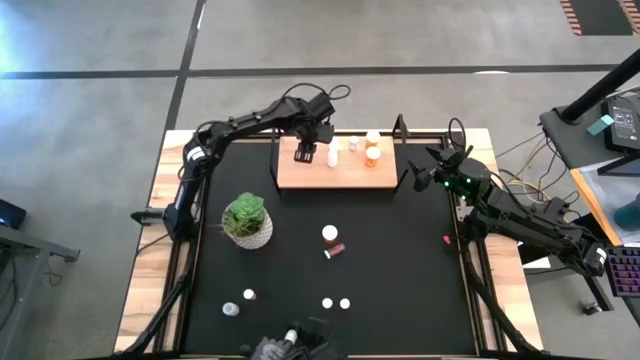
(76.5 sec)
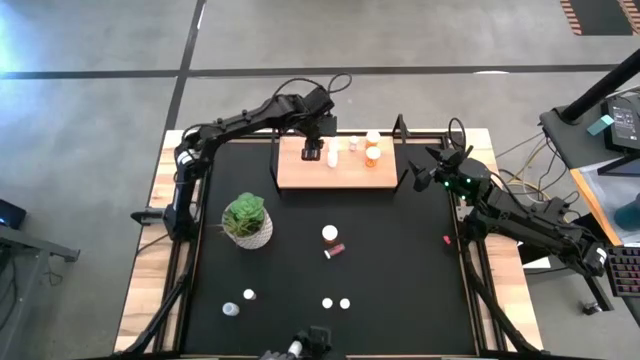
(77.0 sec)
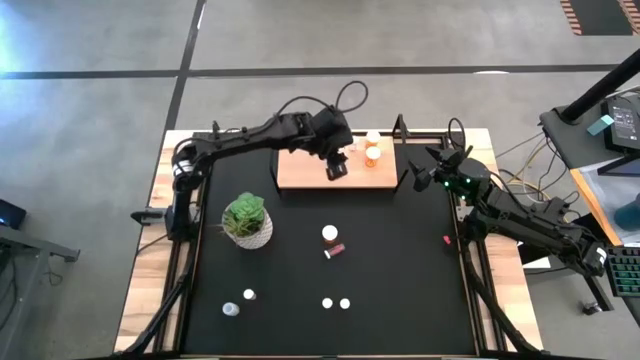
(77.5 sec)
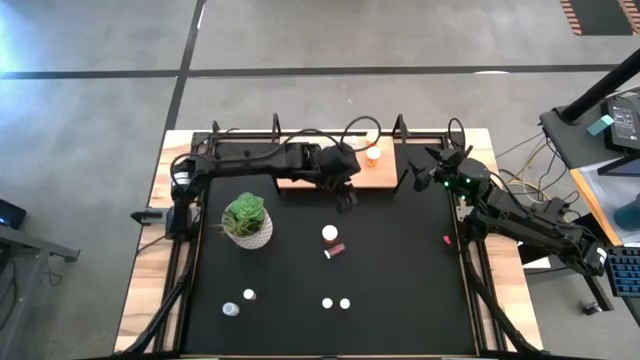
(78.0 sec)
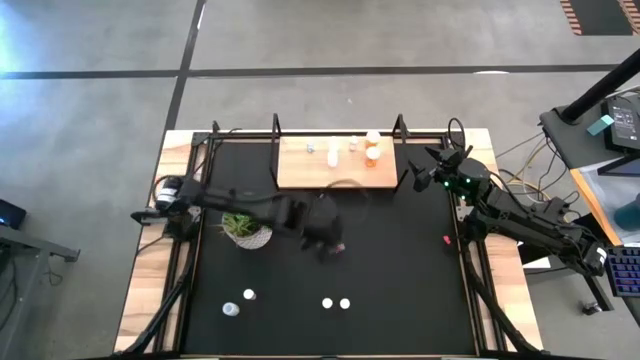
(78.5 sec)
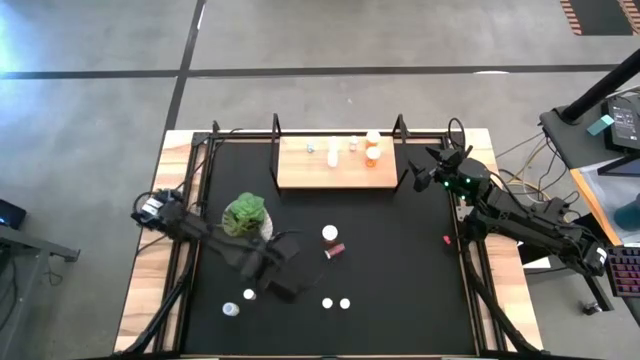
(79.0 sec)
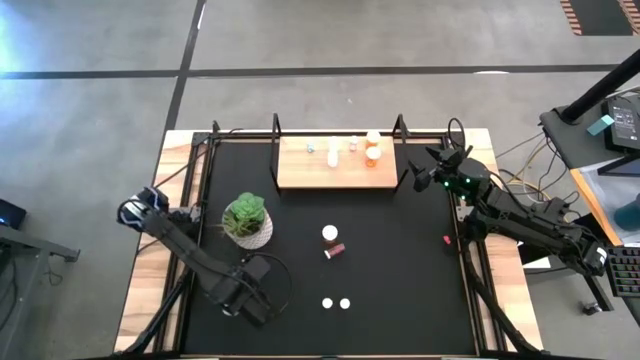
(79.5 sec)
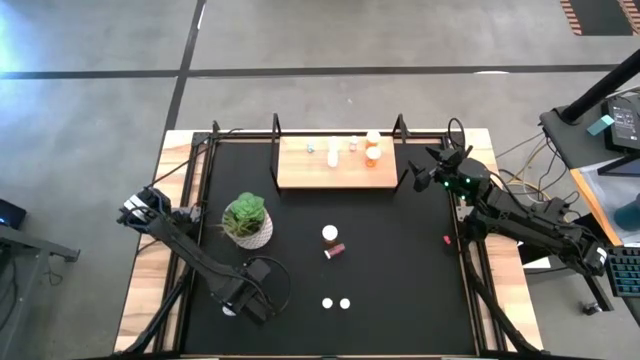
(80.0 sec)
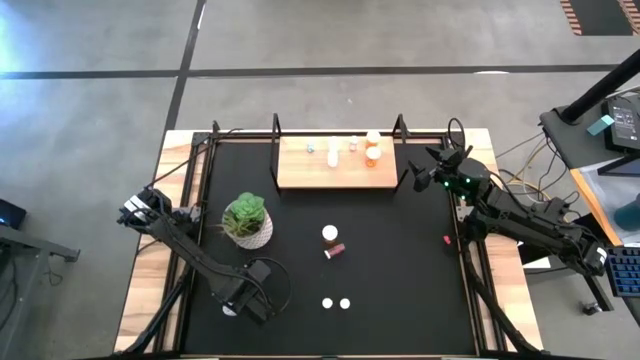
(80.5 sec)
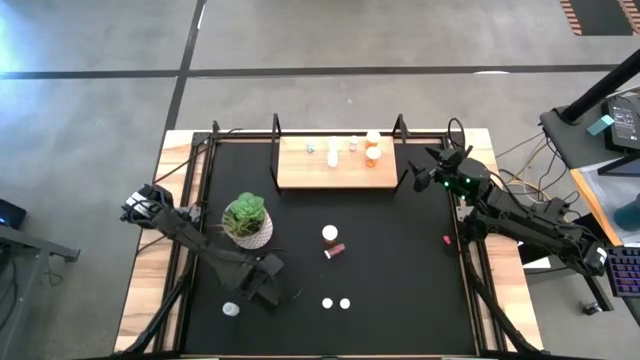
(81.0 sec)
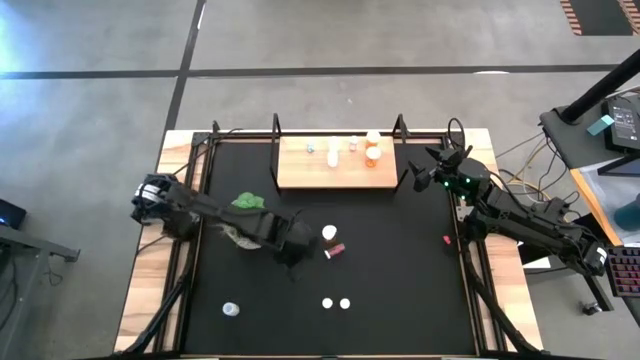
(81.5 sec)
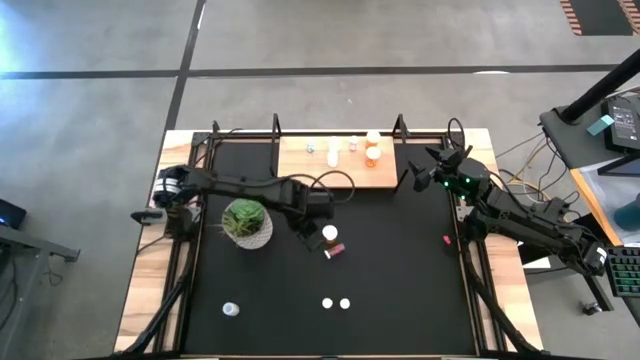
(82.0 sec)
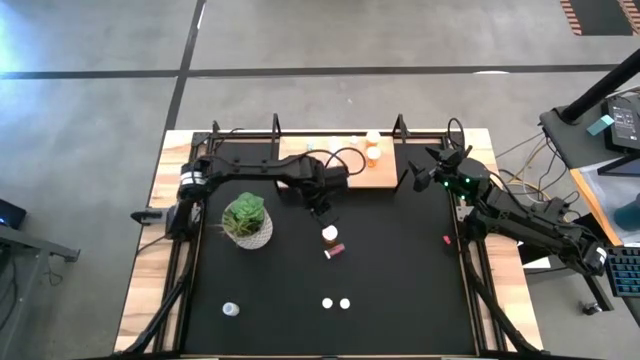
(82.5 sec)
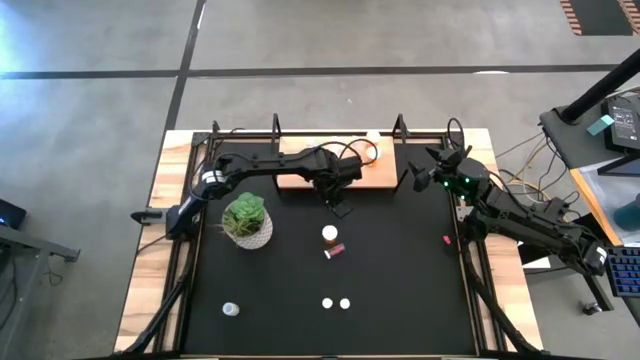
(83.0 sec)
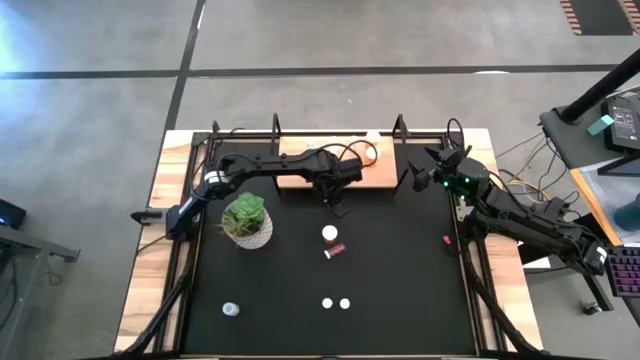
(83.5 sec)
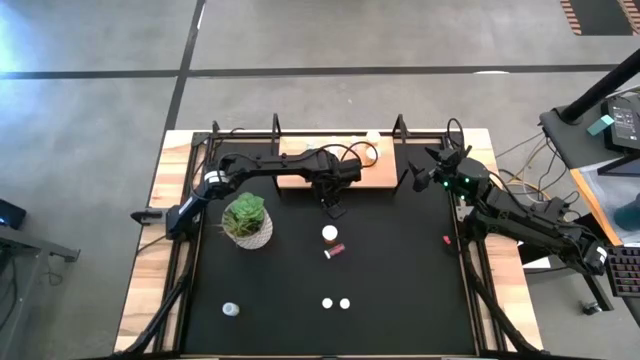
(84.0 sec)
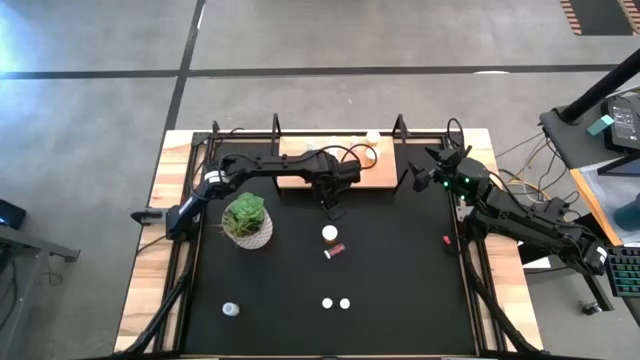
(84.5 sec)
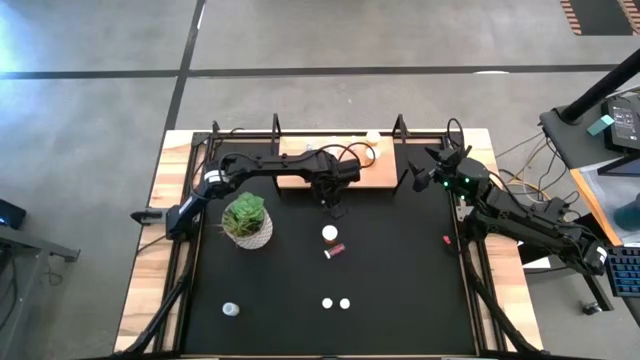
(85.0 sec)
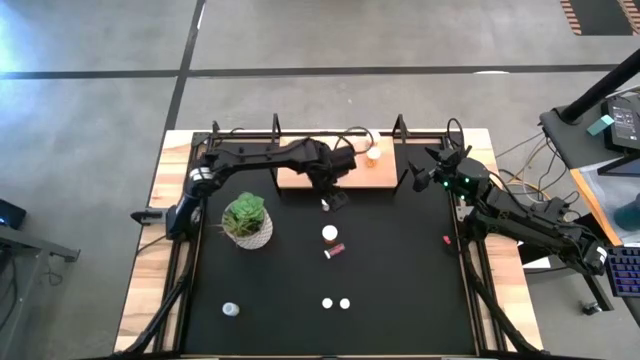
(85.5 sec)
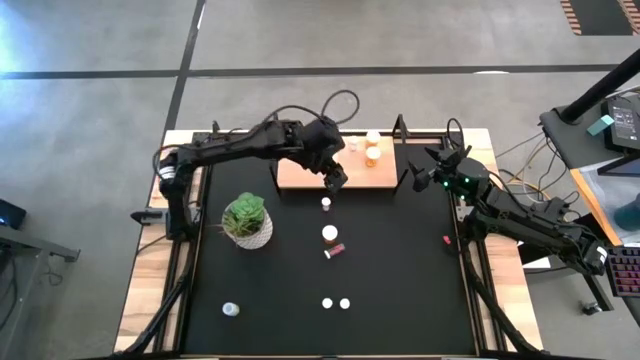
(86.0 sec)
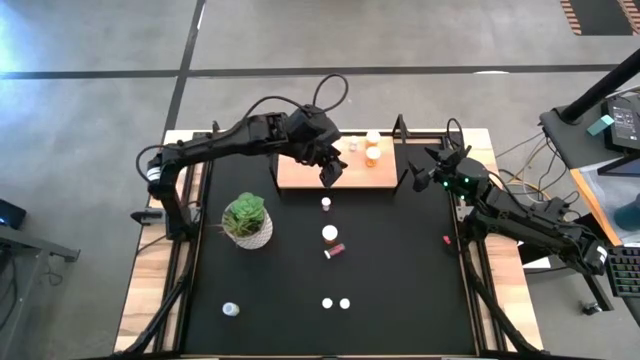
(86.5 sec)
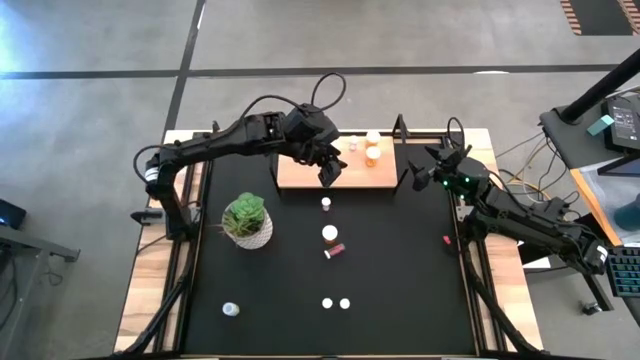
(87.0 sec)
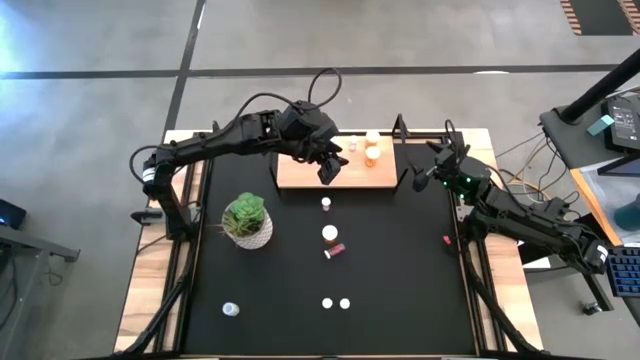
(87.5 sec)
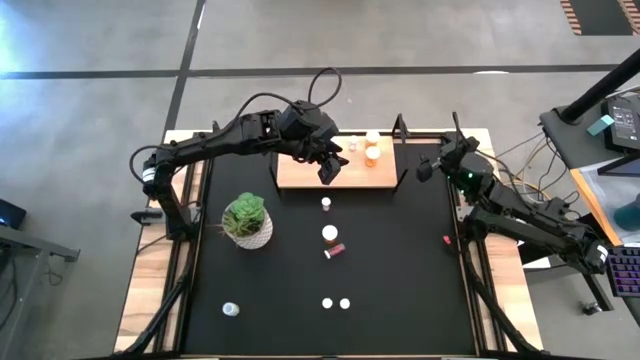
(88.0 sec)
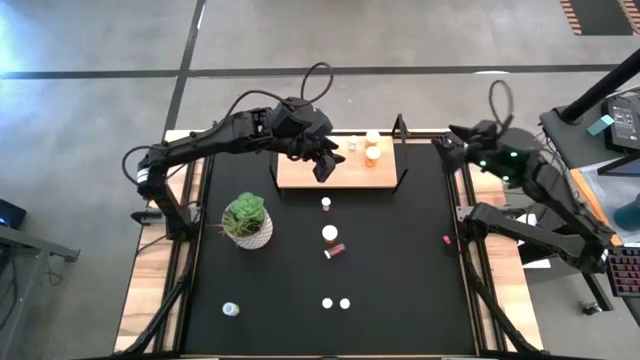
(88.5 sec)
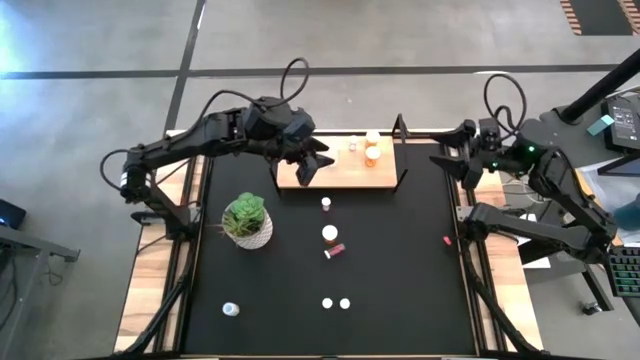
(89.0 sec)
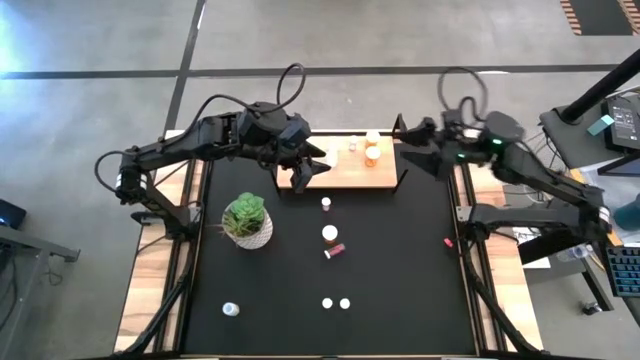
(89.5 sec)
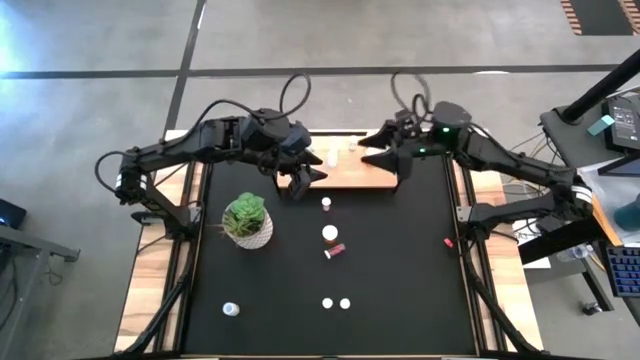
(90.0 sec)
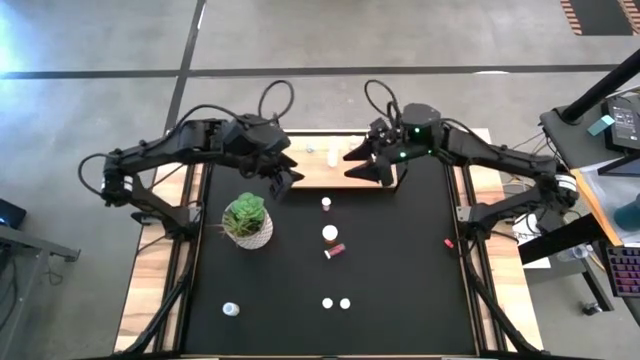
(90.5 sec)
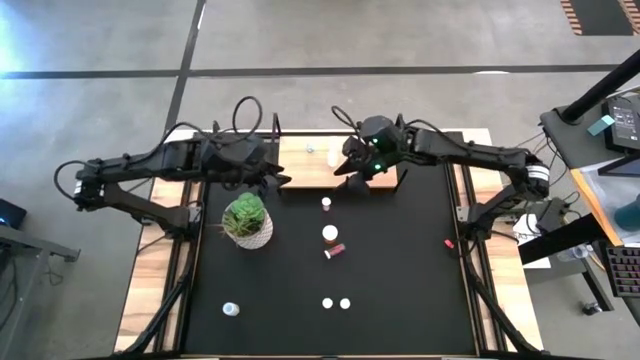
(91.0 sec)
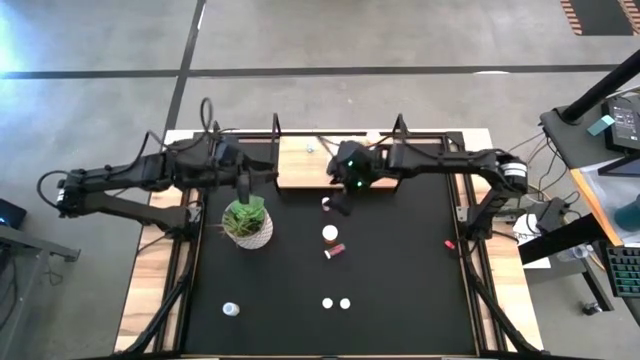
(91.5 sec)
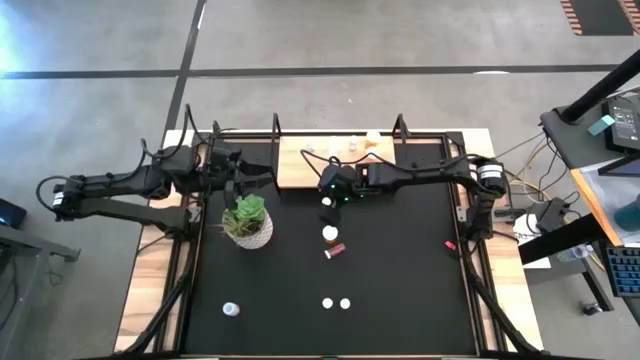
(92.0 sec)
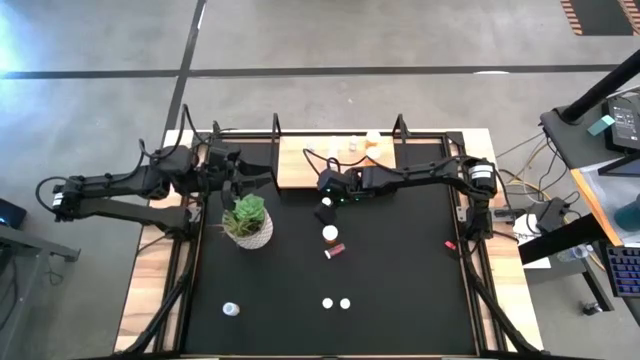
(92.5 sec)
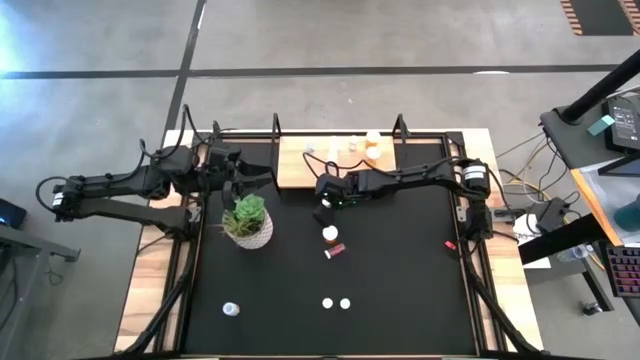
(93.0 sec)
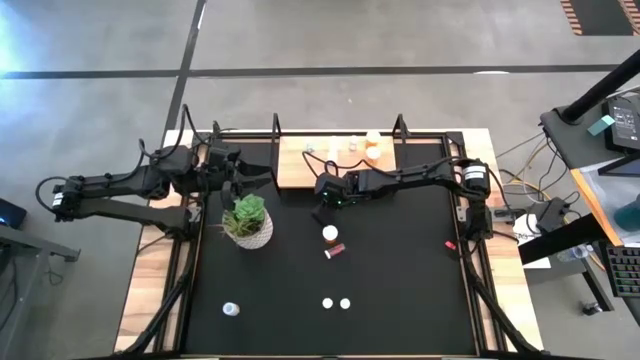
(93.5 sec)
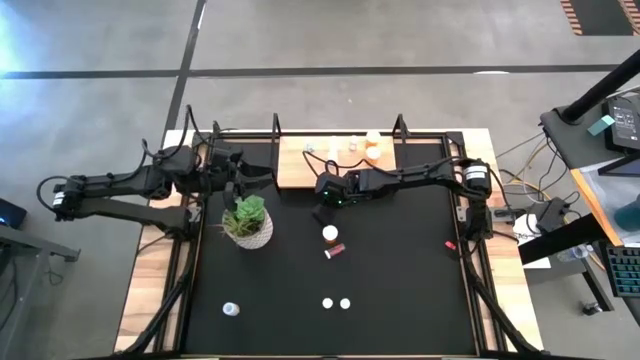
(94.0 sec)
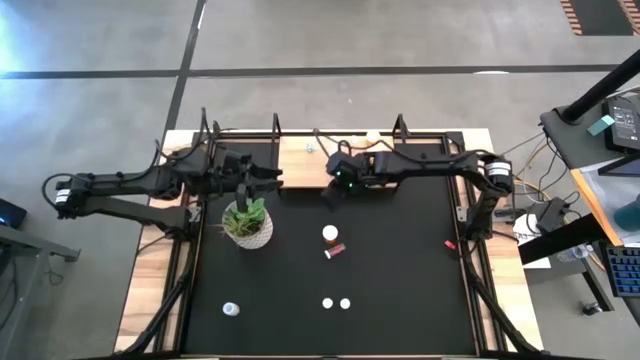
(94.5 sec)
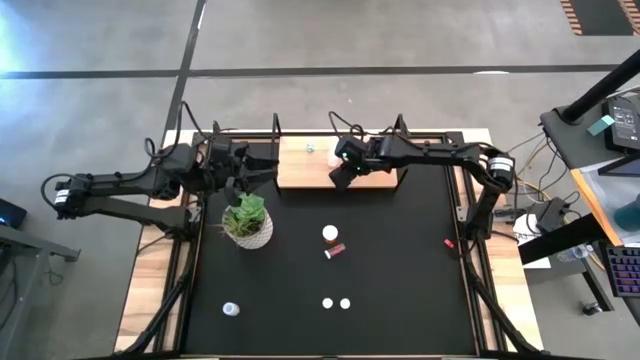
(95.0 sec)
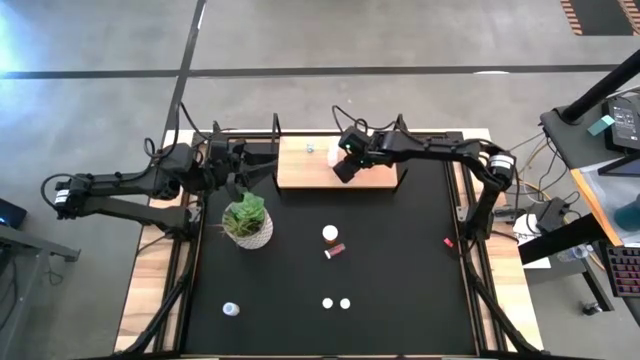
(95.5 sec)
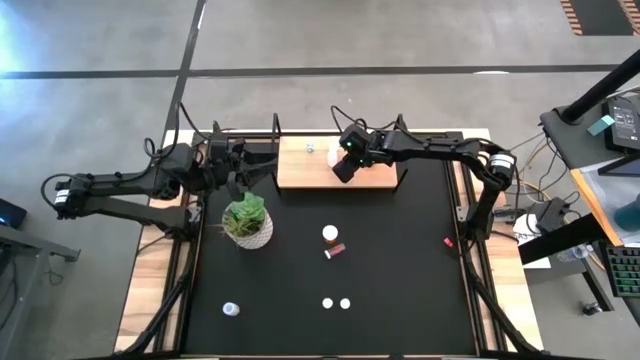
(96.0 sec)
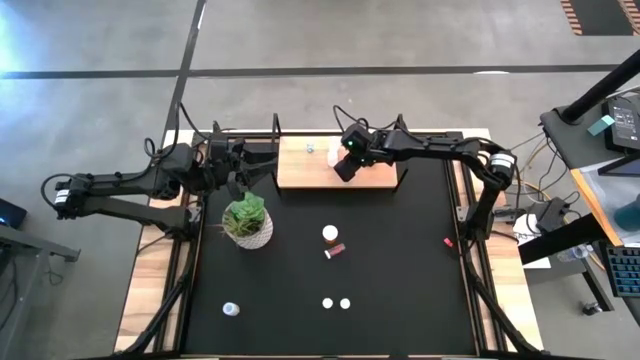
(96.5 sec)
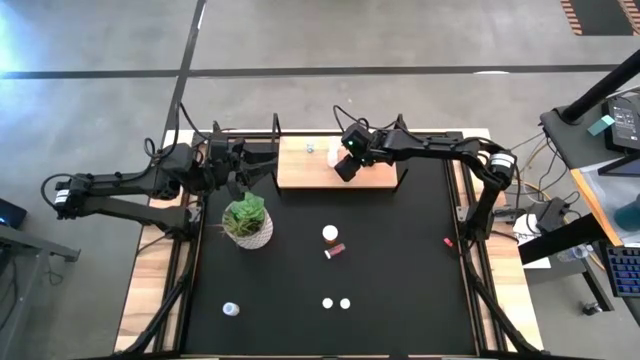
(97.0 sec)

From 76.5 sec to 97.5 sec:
Task: Pick and place medicine bottles onto shelf by color
Put the left pink pill bottle on the shelf aligned with the other pink pill bottle
